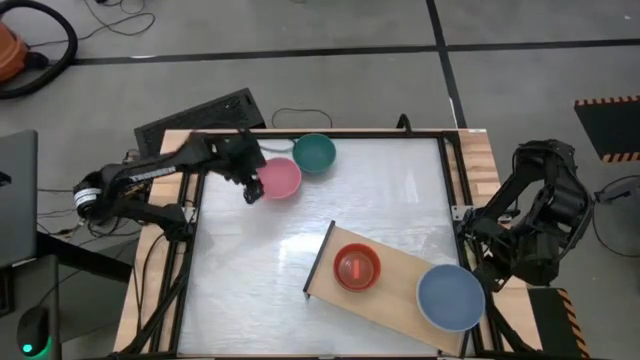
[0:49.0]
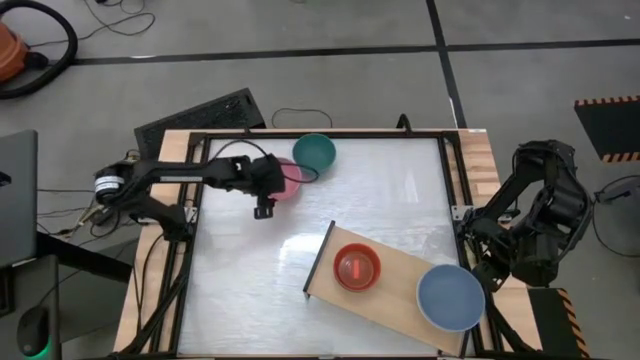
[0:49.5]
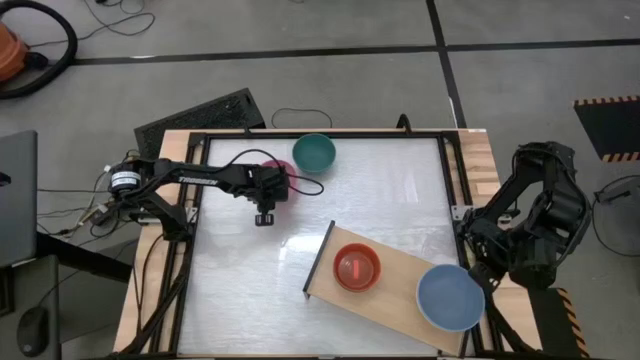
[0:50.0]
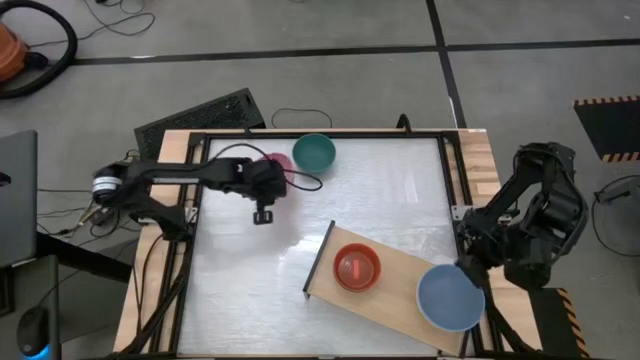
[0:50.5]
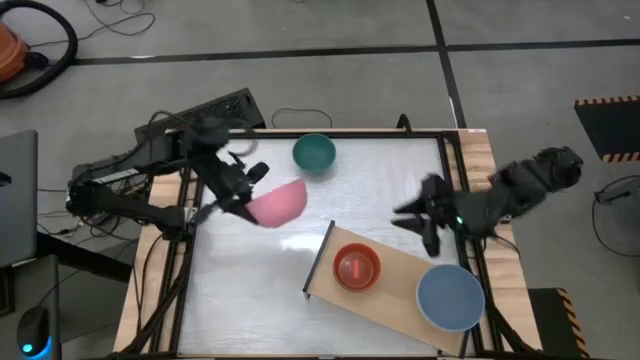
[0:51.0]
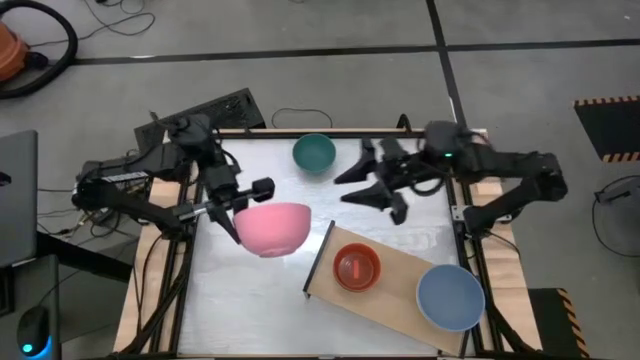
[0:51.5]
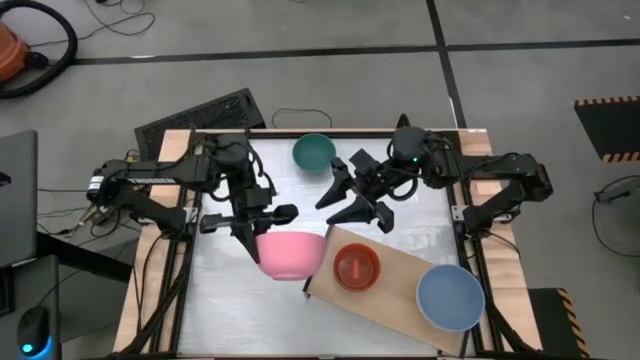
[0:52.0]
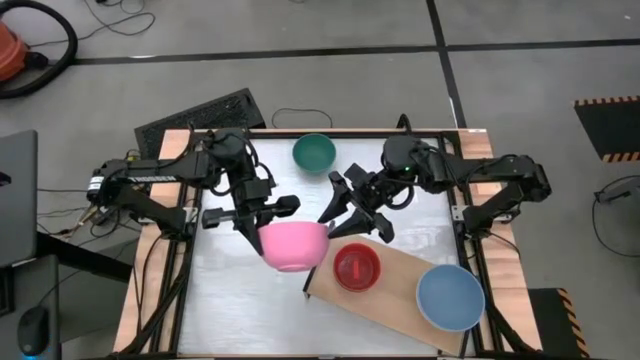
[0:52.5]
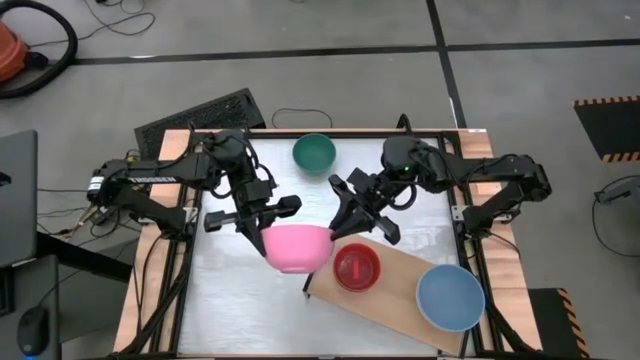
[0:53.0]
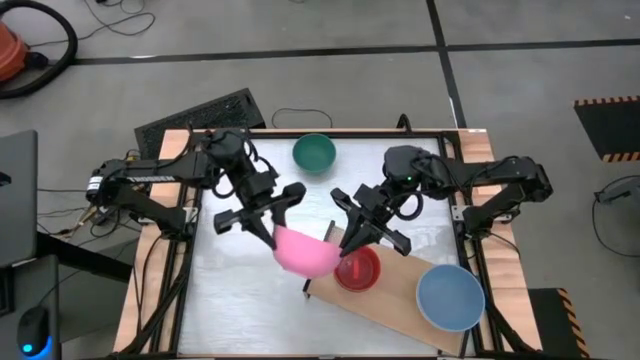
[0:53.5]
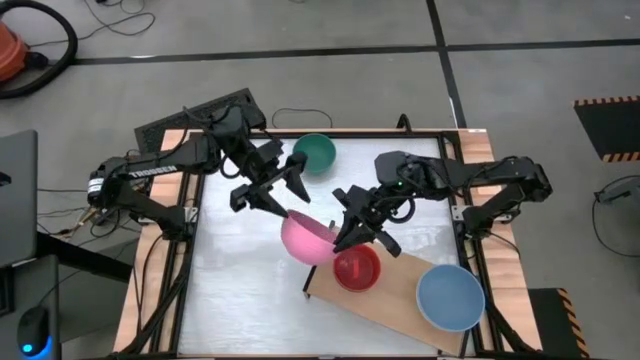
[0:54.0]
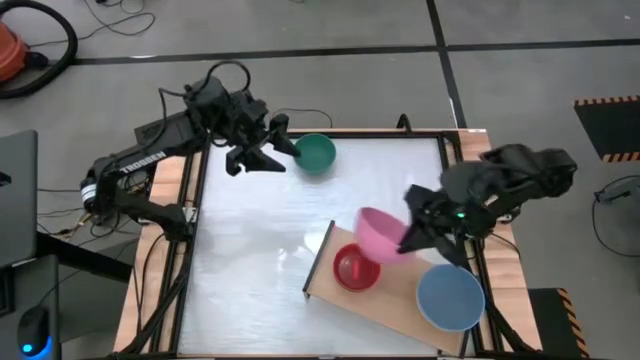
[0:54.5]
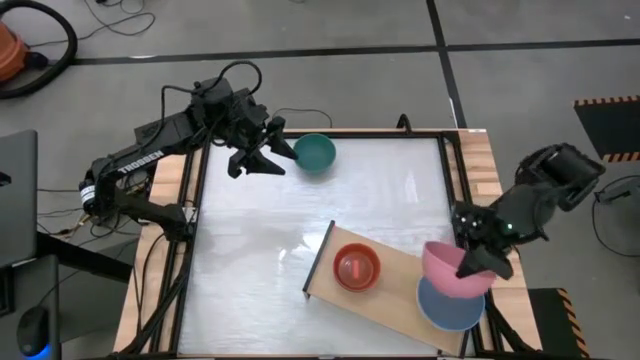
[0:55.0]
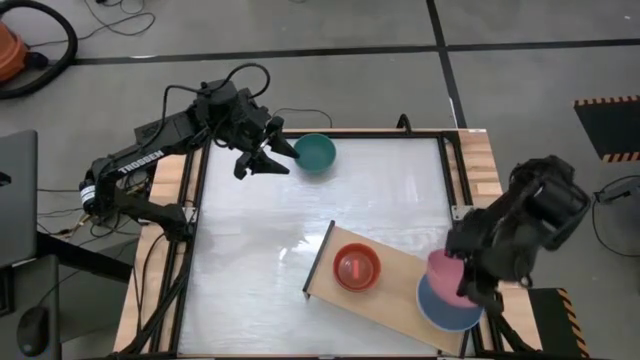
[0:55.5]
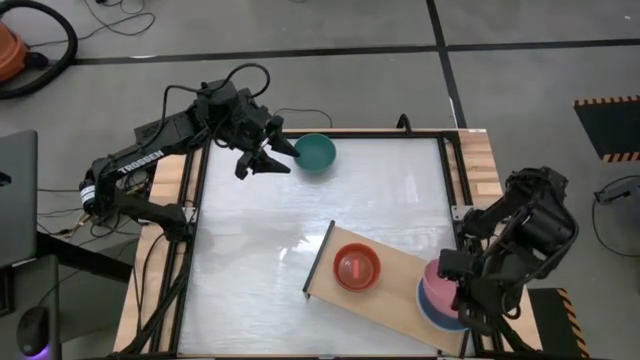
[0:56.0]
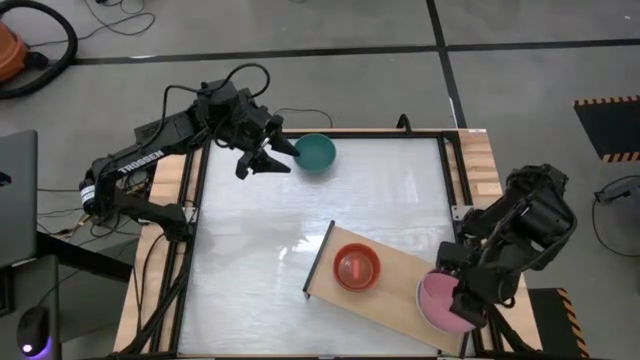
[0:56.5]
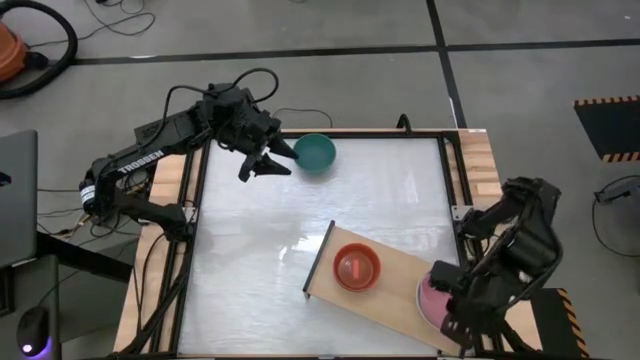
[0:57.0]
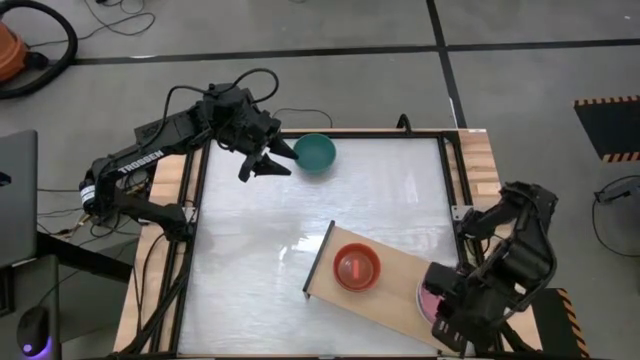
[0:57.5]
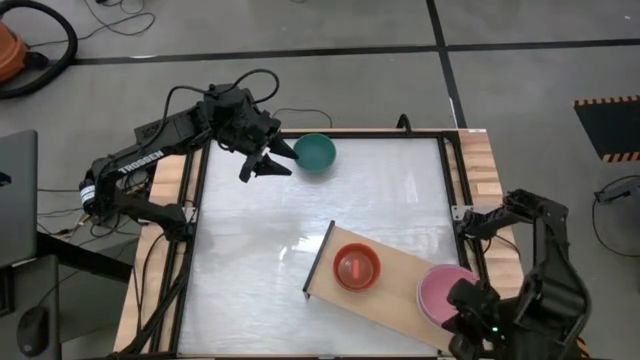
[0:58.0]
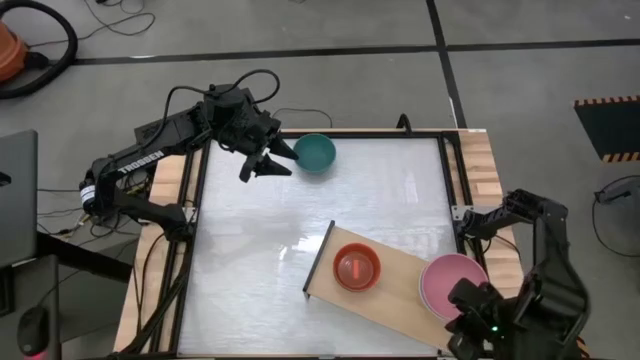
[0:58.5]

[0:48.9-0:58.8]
Task: Place and stack bowls onto a shelf
Stack the pink bowl on top of the blue bowl on the shelf

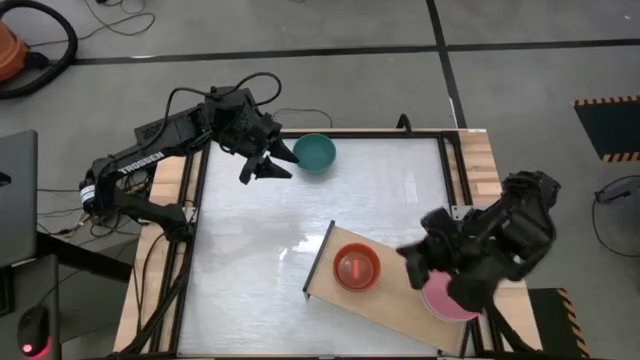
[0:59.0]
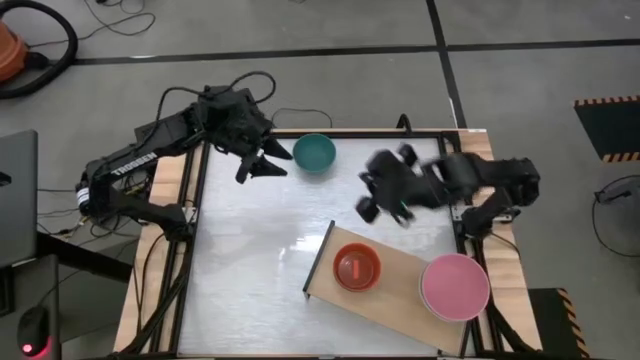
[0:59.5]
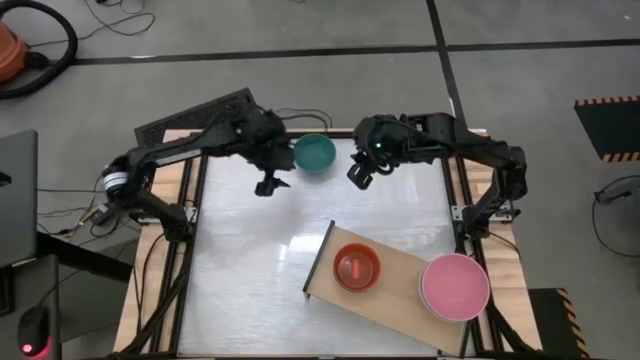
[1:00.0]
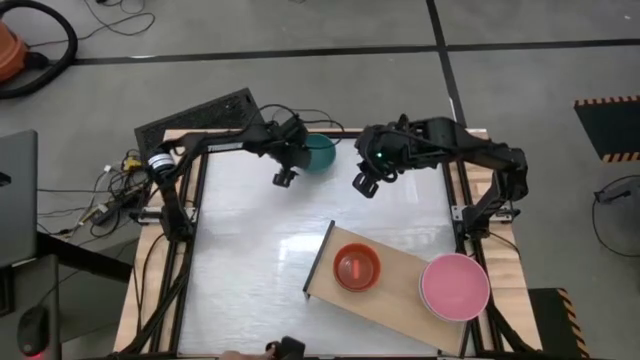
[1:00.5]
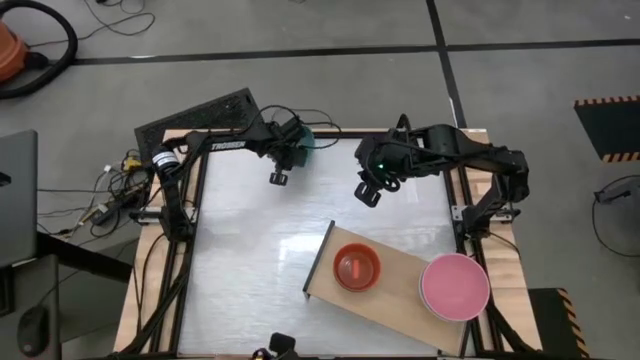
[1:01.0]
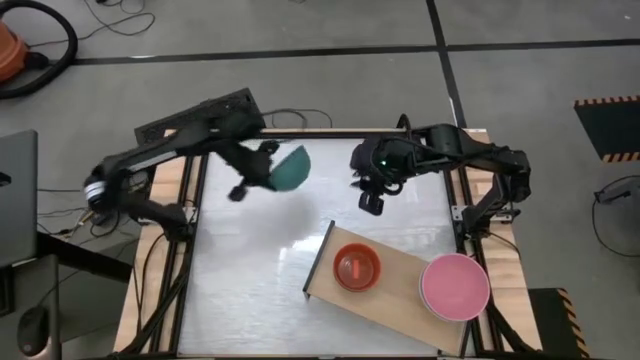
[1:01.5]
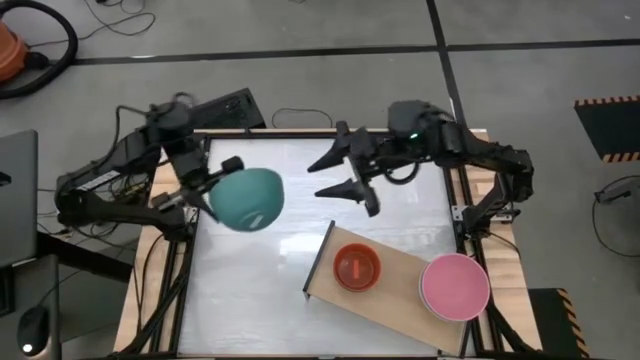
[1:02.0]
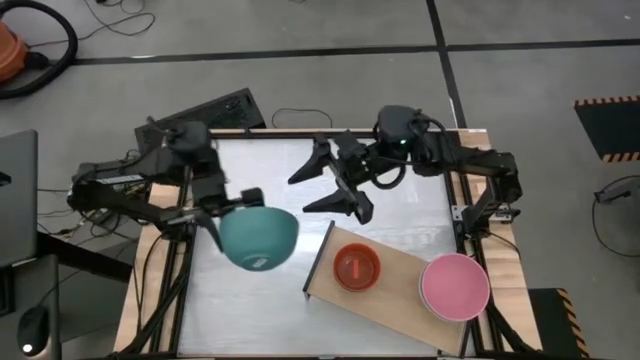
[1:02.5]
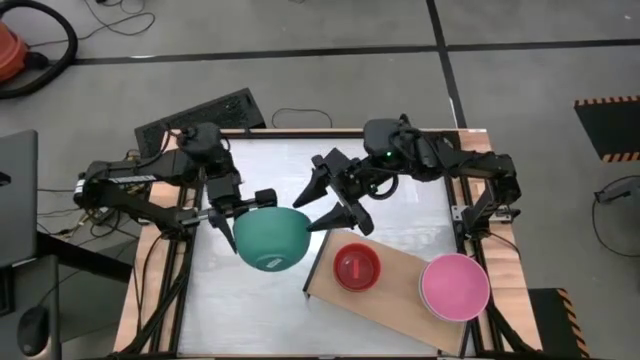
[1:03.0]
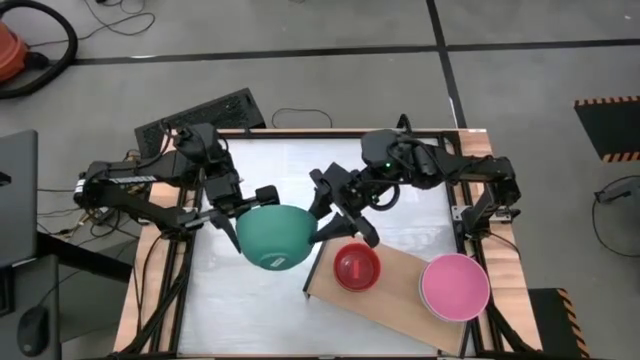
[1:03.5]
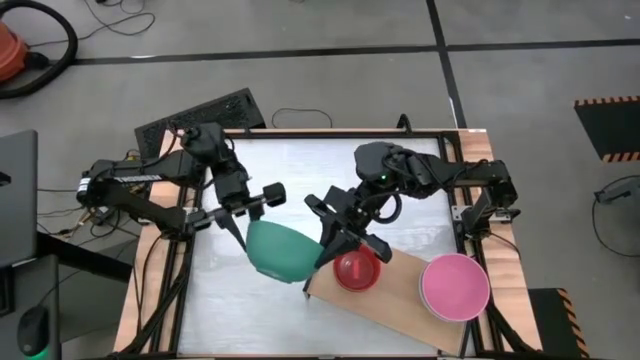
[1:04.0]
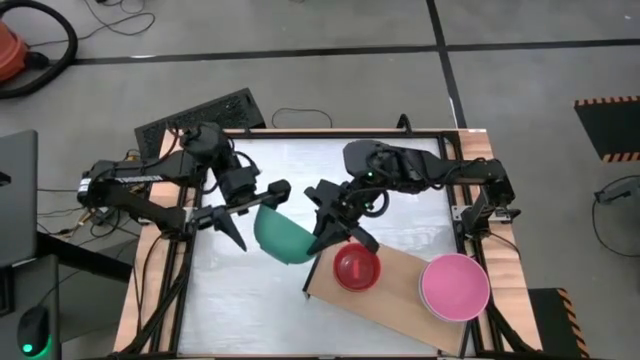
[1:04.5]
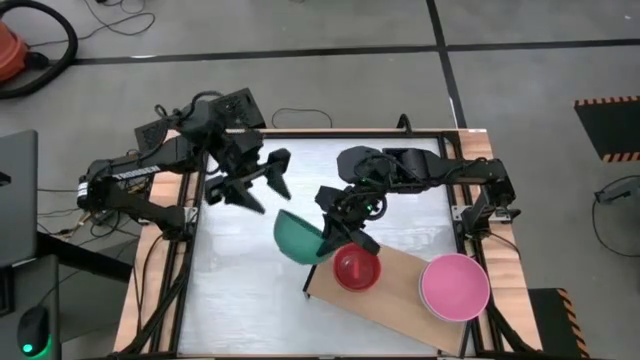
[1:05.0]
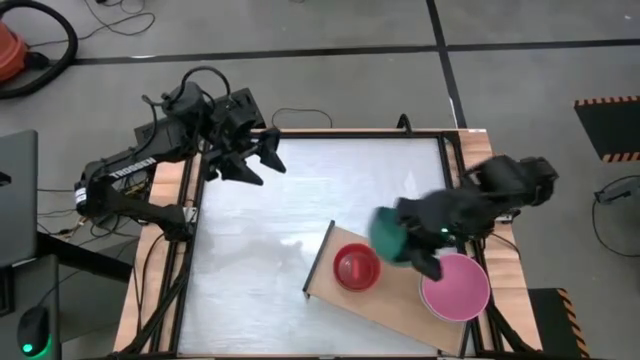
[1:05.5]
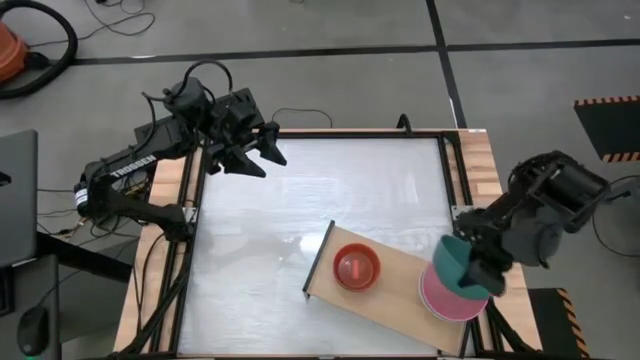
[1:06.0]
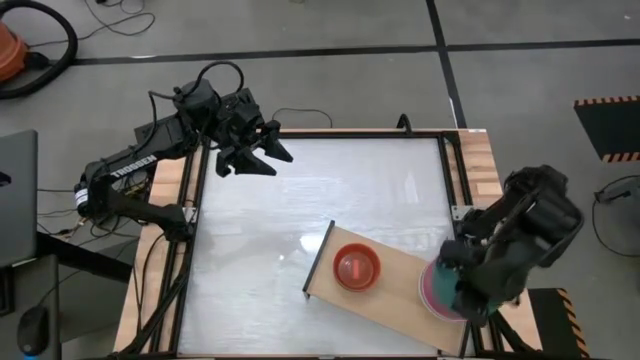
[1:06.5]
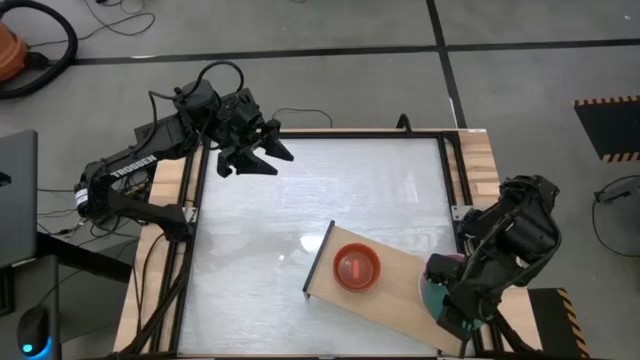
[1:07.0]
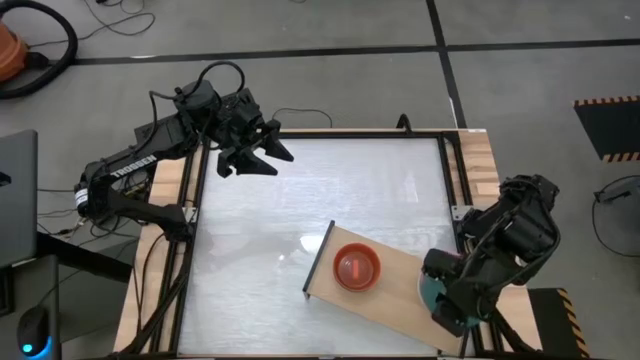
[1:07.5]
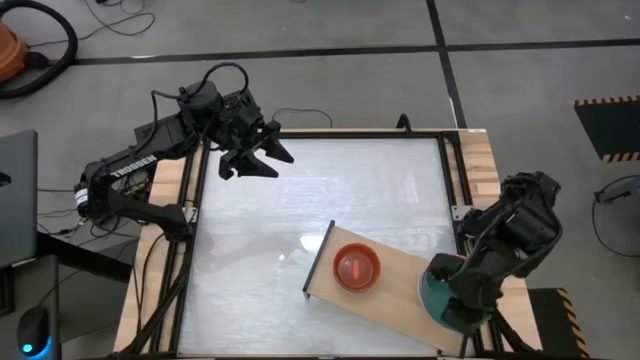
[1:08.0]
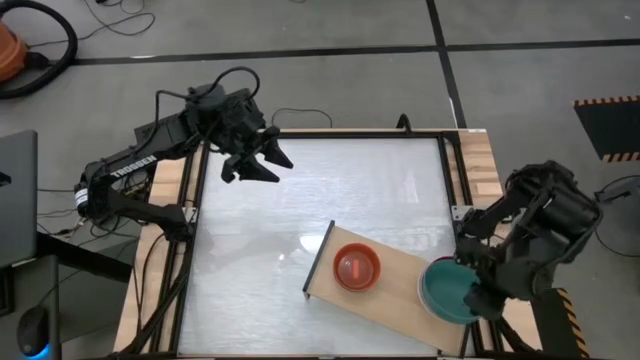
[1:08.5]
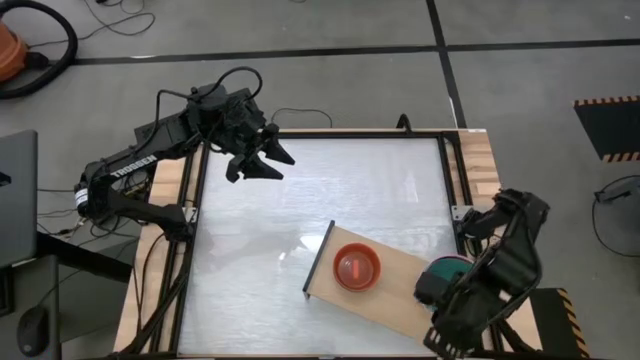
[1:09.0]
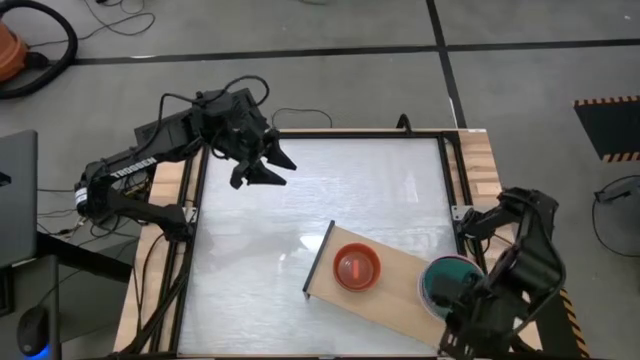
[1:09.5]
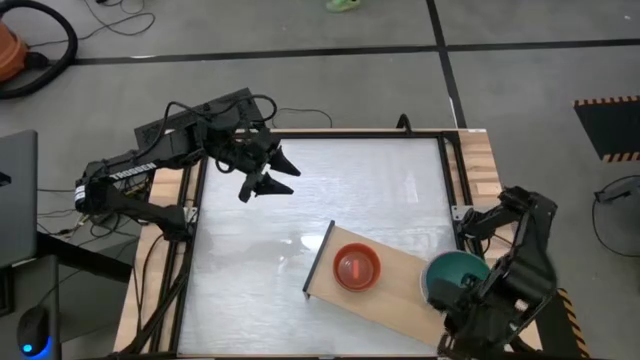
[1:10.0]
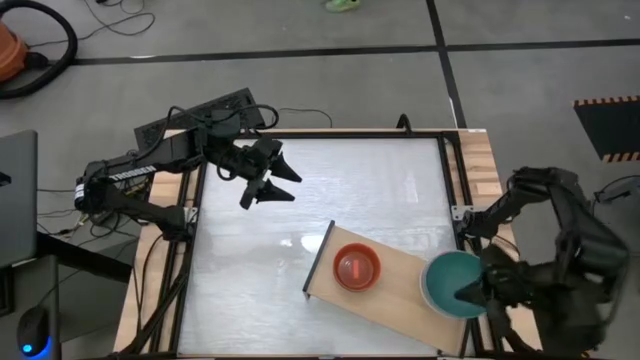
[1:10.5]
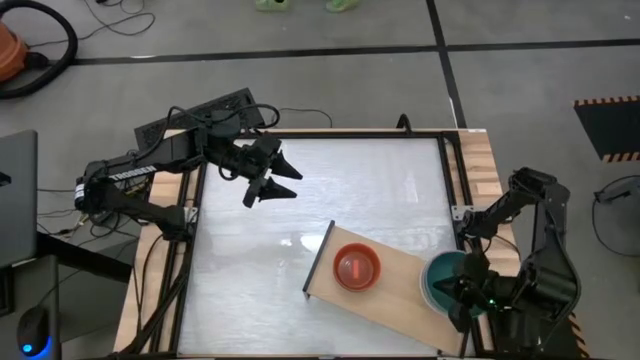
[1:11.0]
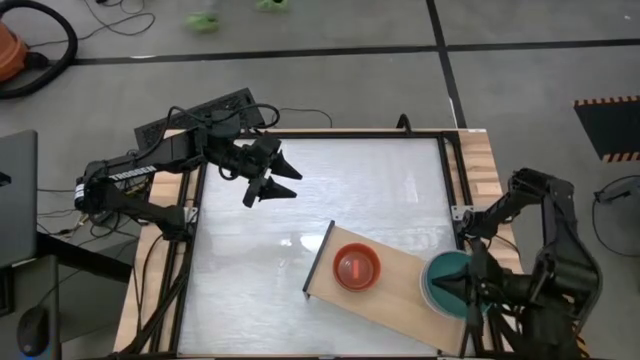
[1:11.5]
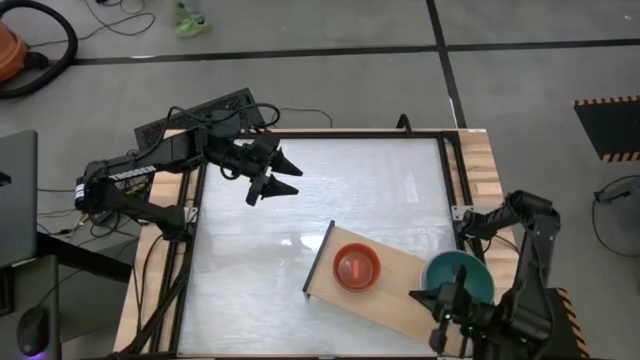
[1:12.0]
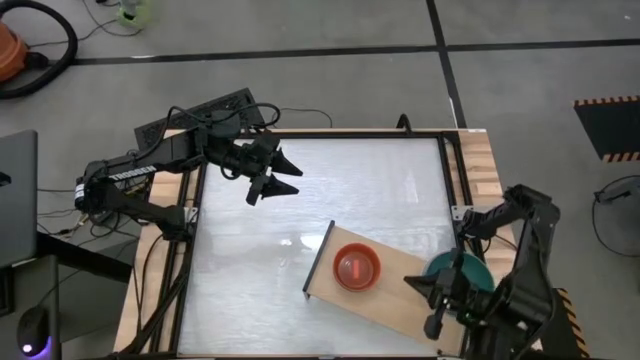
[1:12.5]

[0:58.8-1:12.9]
Stack the green bowl on top of pink bowl on the shelf
